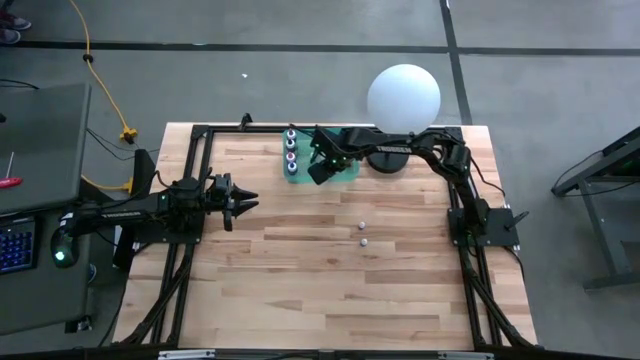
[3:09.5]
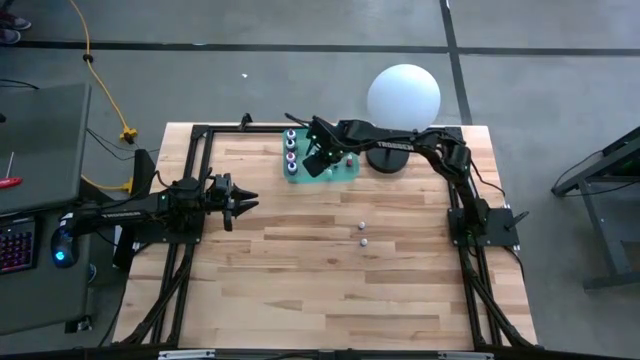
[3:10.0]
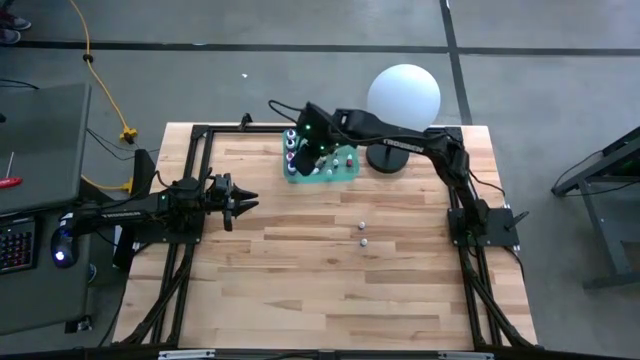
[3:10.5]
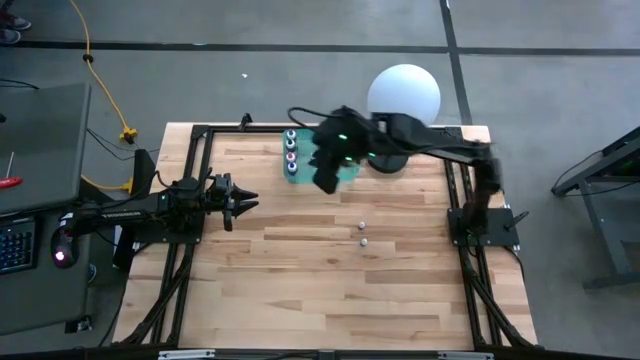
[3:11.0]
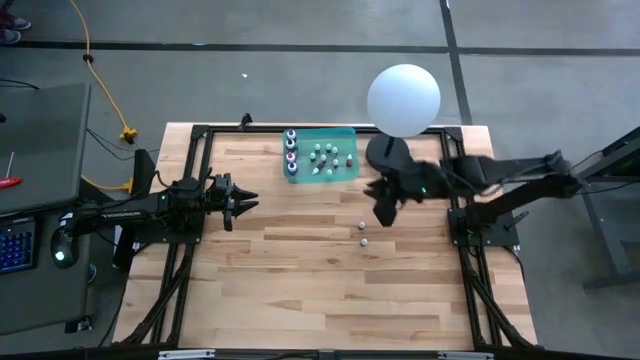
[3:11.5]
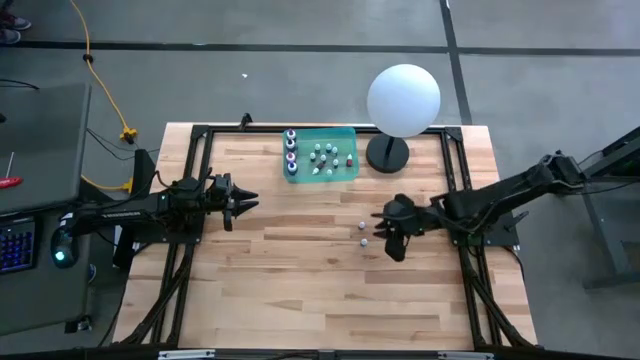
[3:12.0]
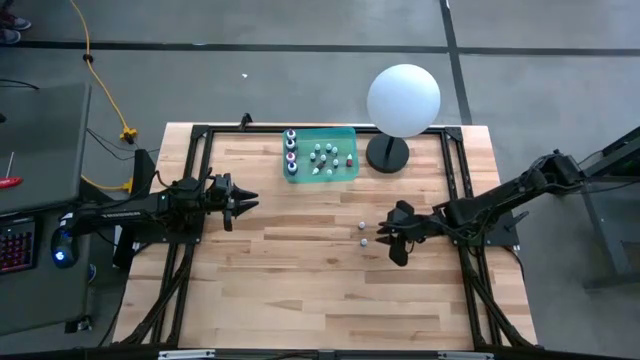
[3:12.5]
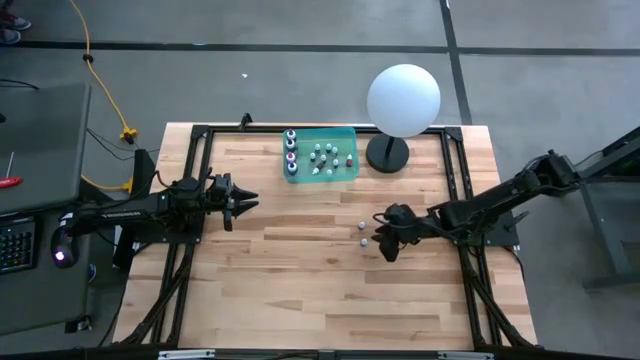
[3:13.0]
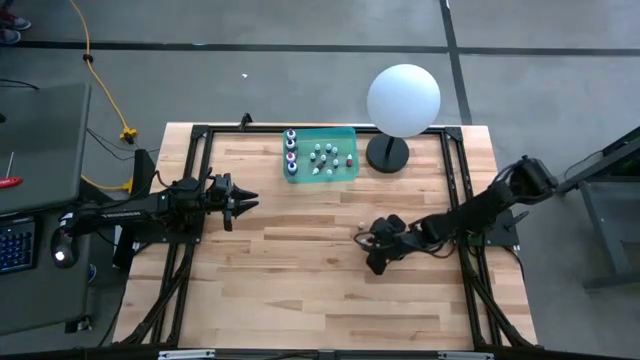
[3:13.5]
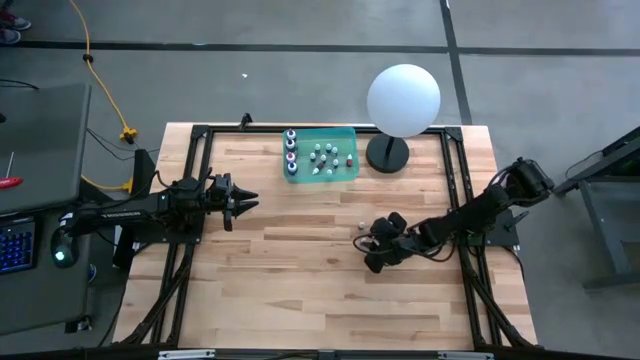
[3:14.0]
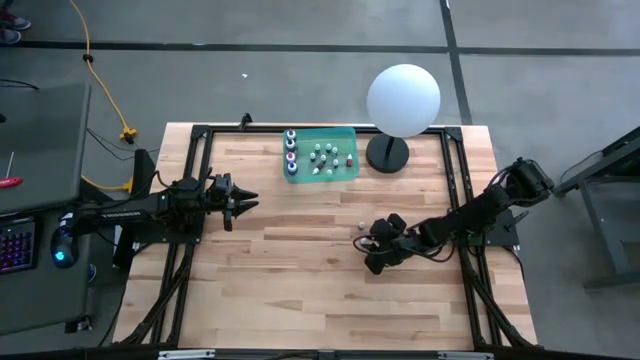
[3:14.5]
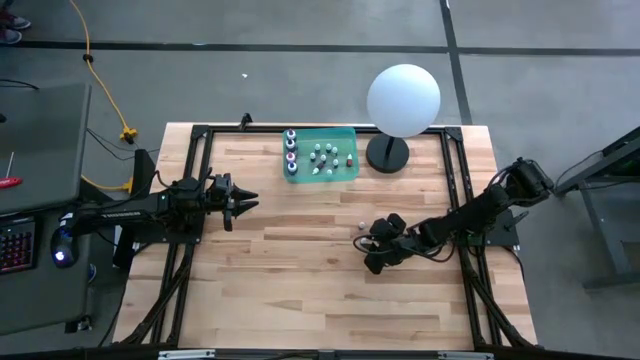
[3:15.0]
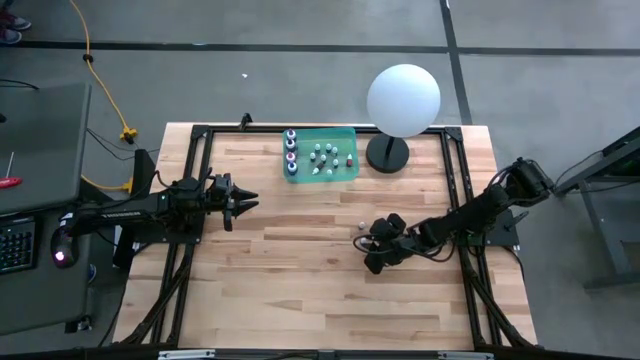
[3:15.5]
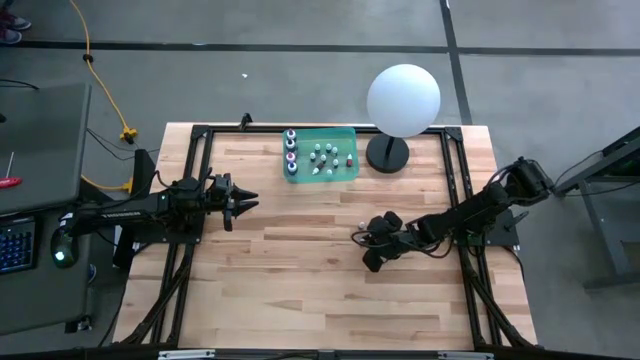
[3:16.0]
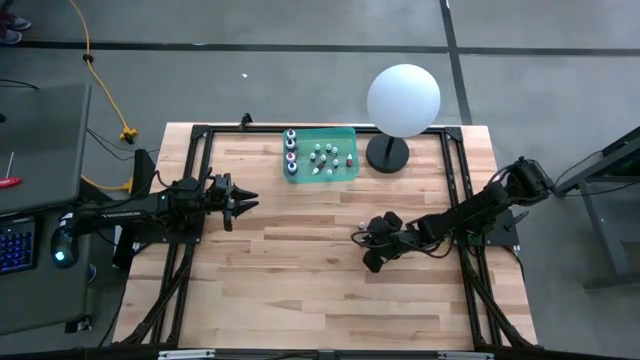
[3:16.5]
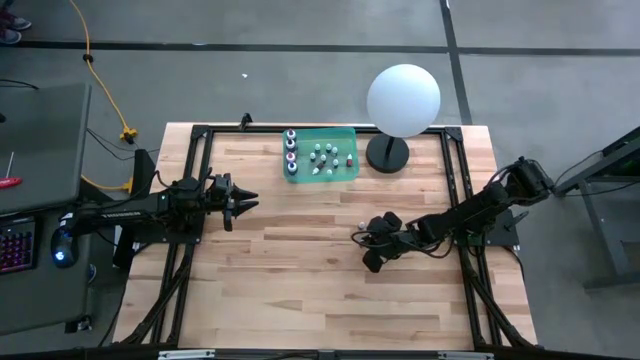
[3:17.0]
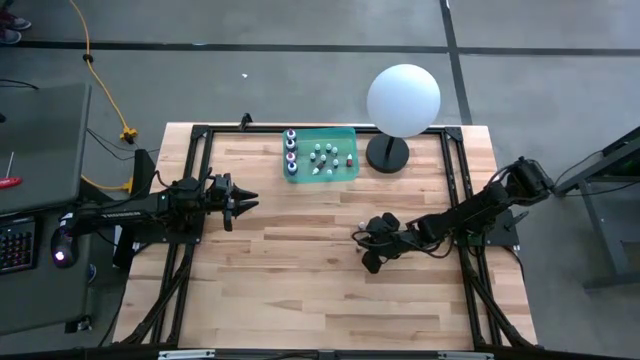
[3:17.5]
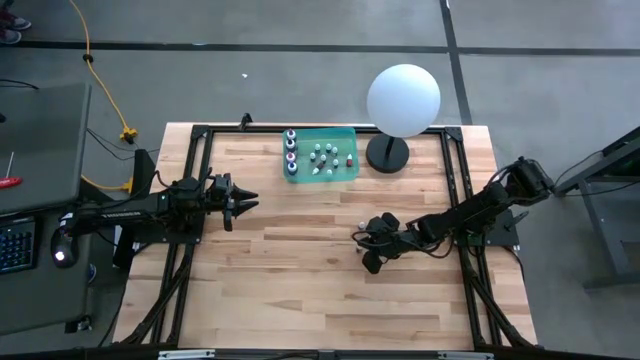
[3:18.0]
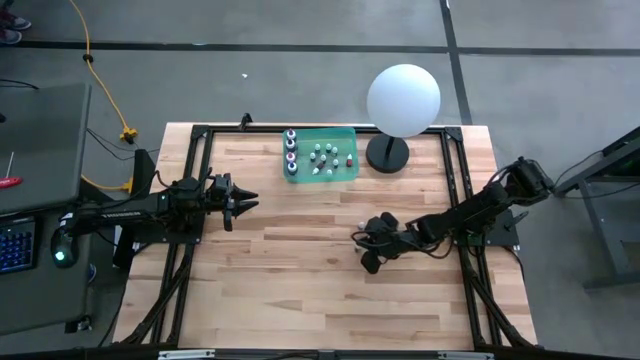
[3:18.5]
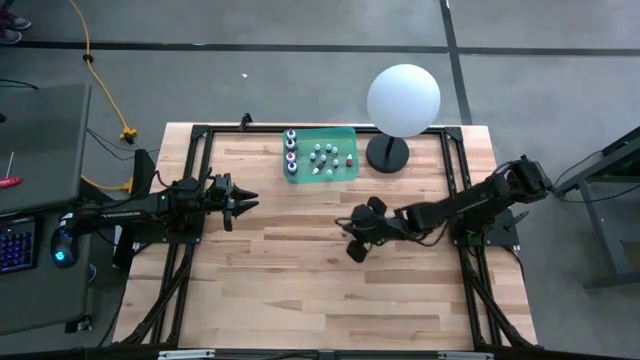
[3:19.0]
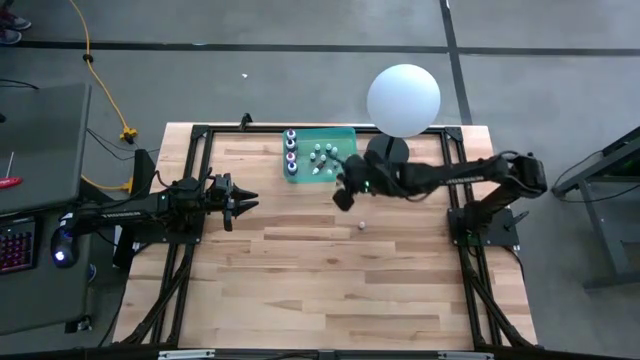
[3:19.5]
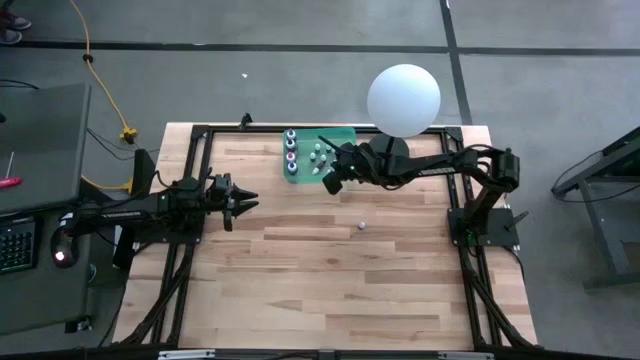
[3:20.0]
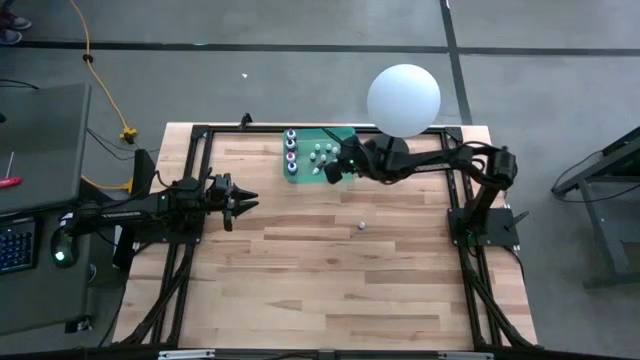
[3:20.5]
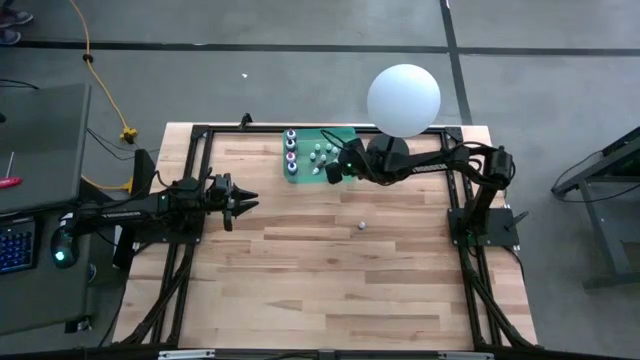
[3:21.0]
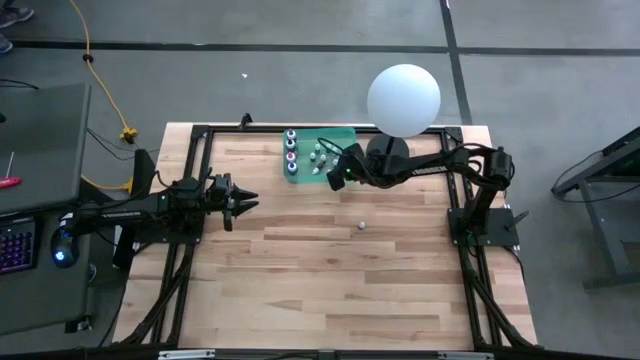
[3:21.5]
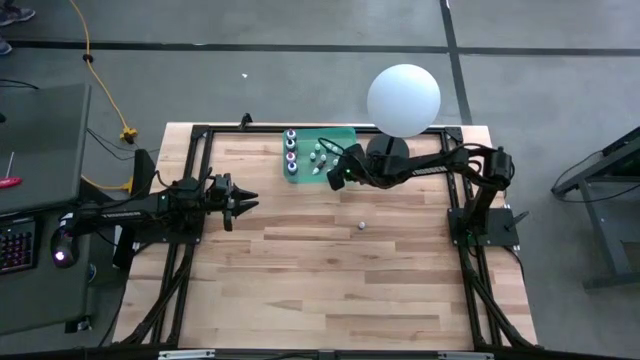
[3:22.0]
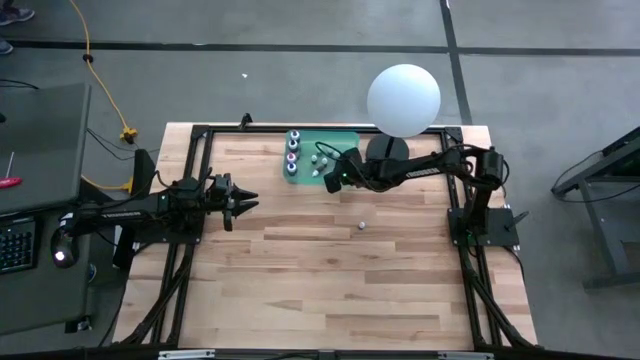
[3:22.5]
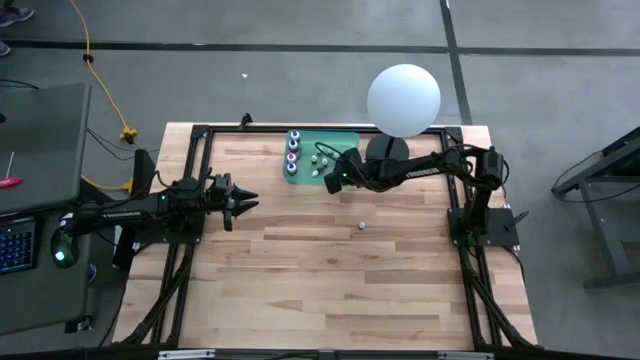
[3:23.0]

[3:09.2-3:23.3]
Task: Pick & Place food coloring
Put the small light green food coloring bottle into the green bin

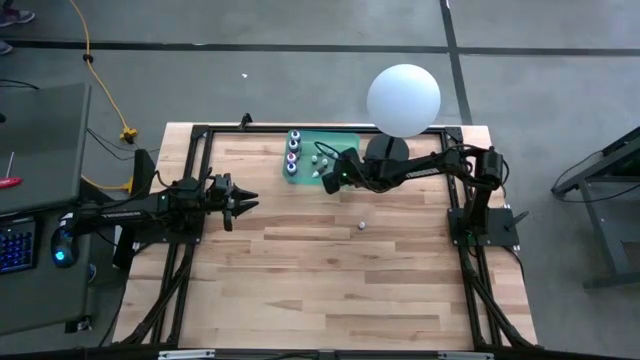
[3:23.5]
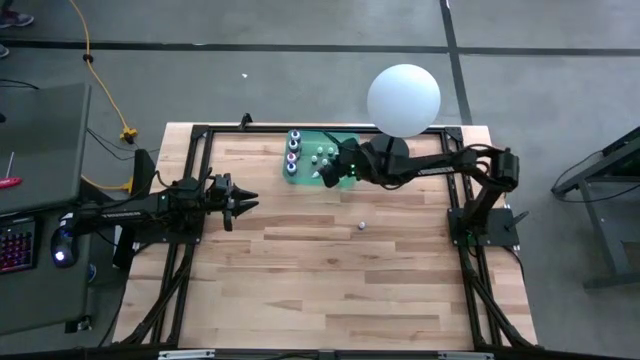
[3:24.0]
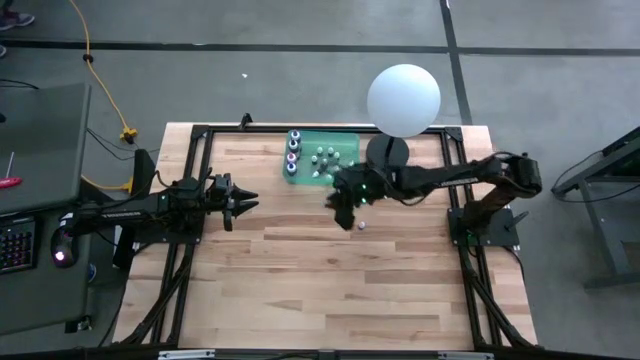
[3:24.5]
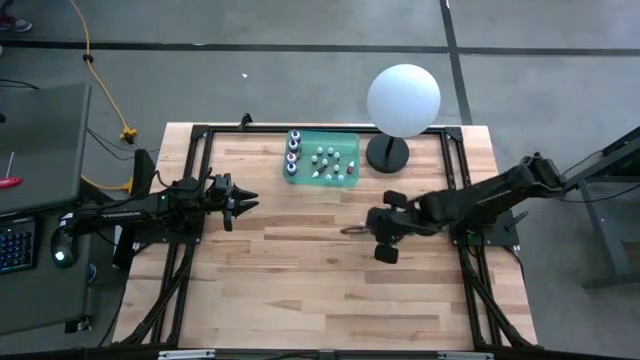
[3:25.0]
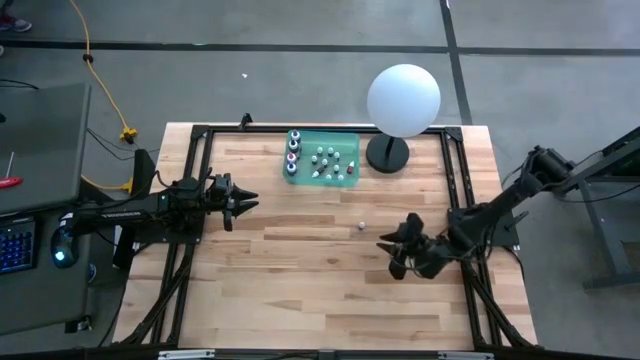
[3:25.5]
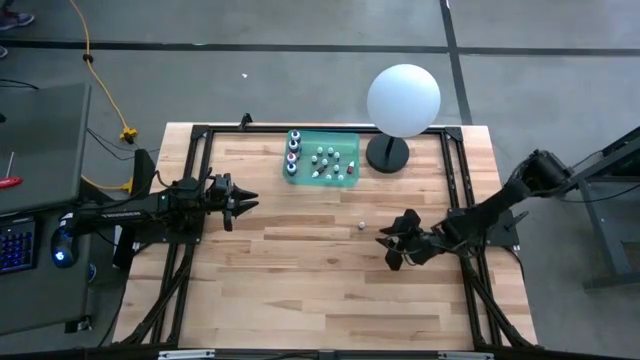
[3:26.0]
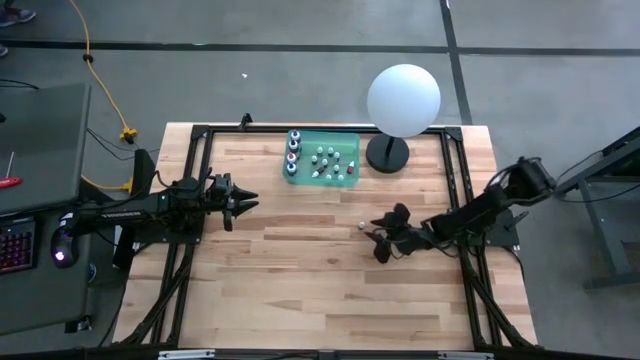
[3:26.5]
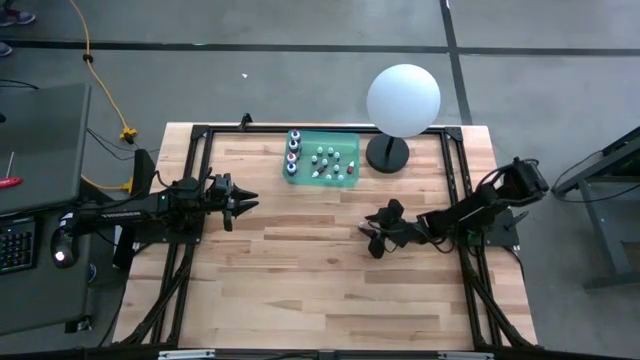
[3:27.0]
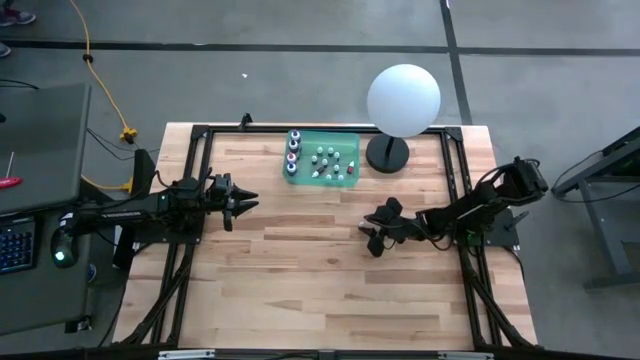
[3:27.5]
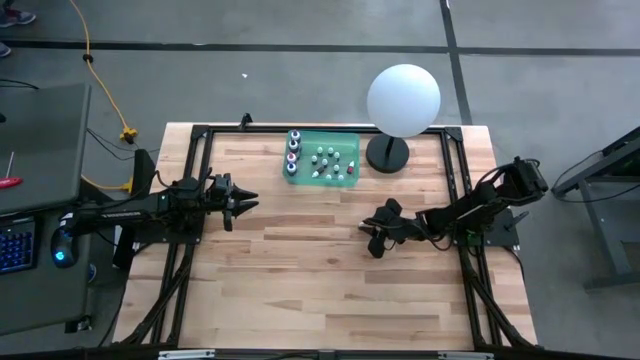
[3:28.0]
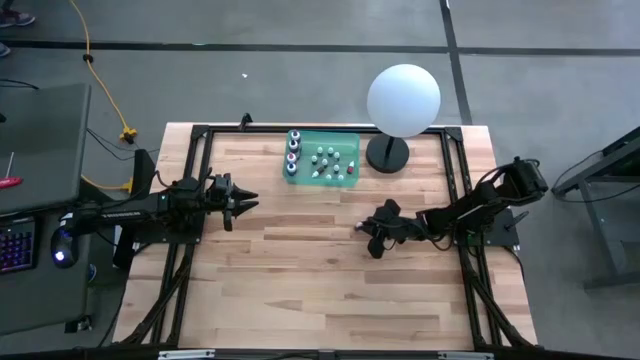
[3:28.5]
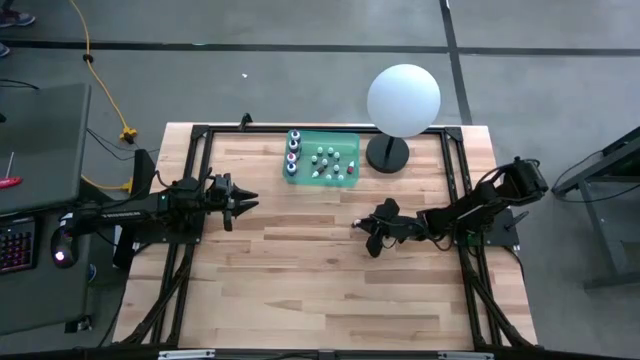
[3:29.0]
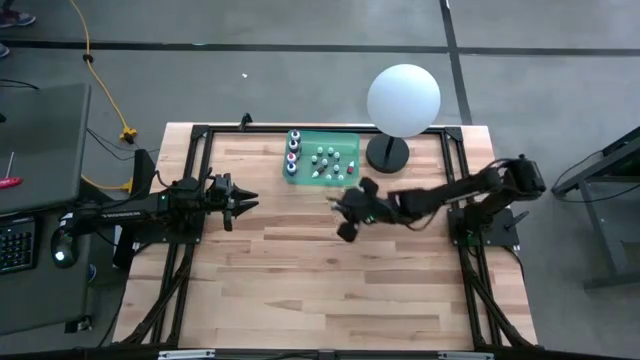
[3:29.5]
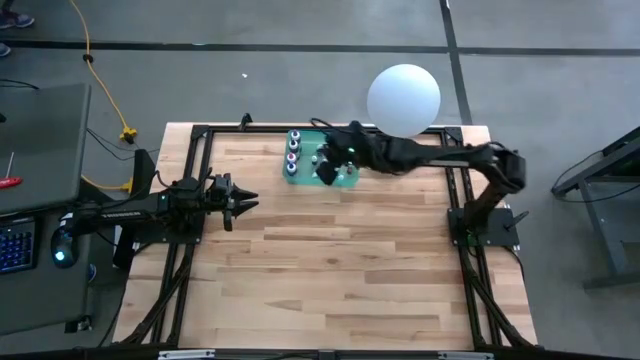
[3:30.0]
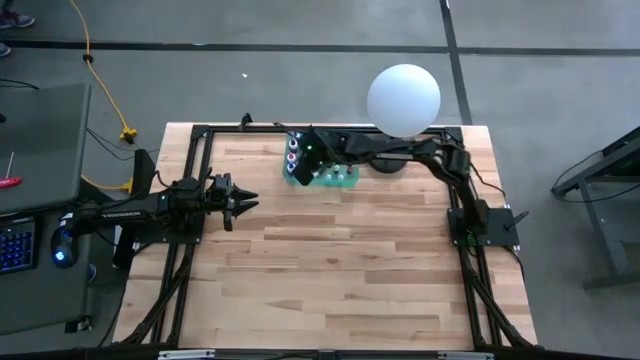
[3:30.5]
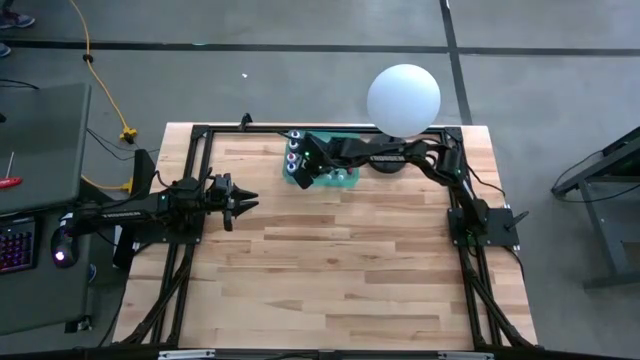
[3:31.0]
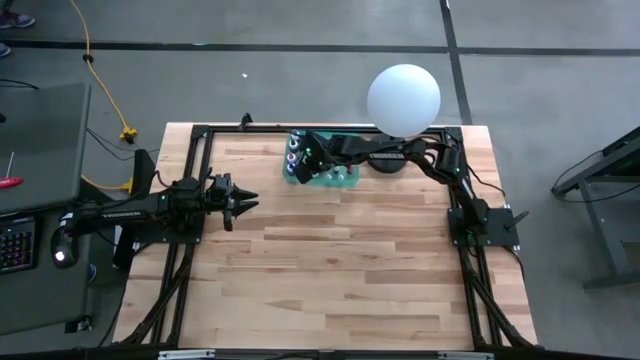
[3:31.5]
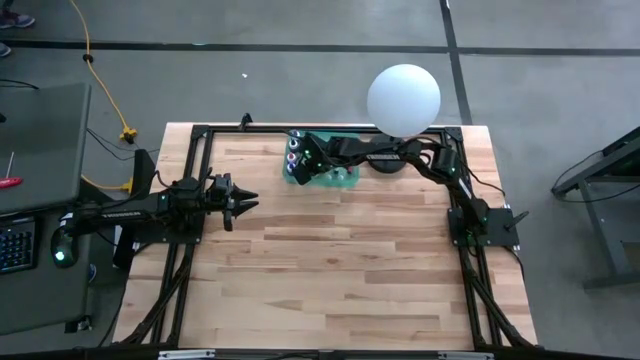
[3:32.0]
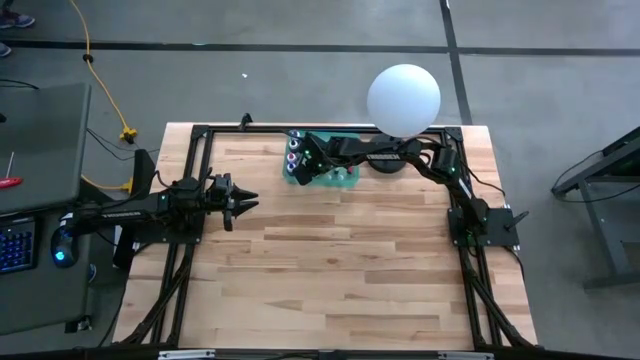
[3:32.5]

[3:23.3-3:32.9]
Put the small brown food coloring bottle into the green bin
